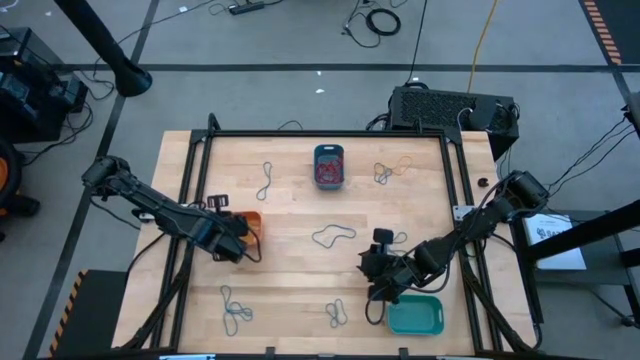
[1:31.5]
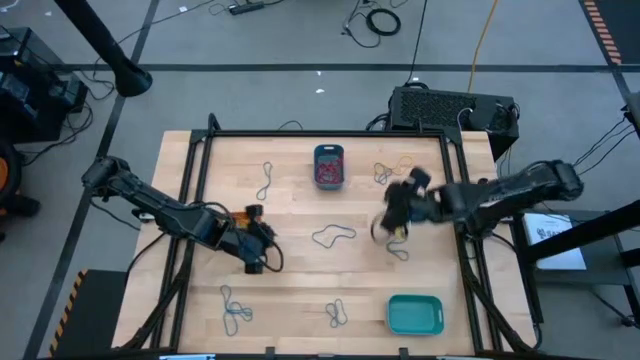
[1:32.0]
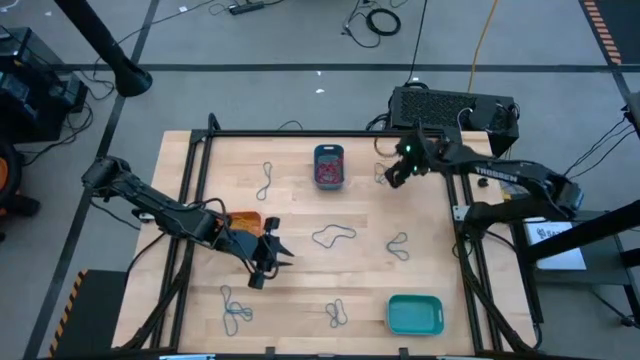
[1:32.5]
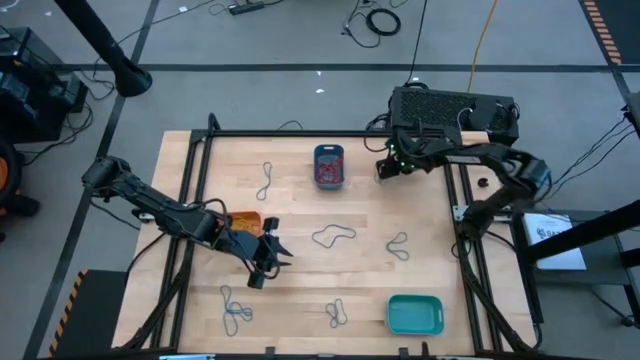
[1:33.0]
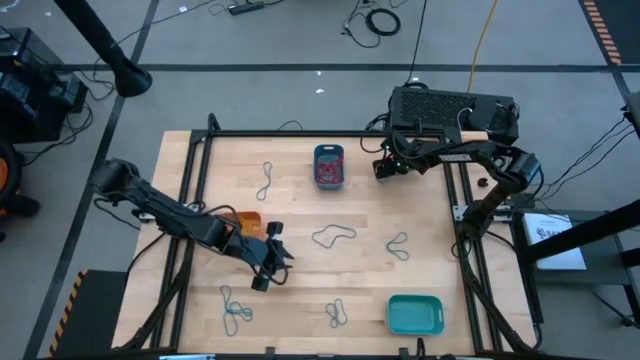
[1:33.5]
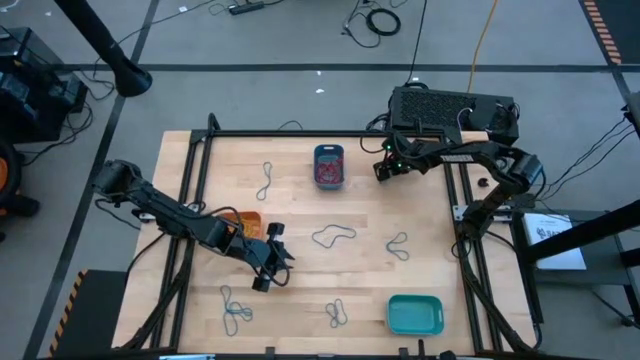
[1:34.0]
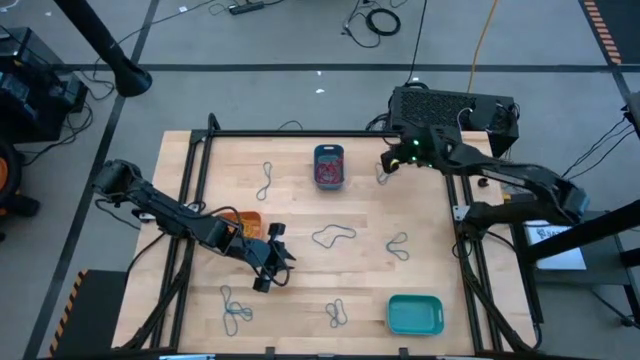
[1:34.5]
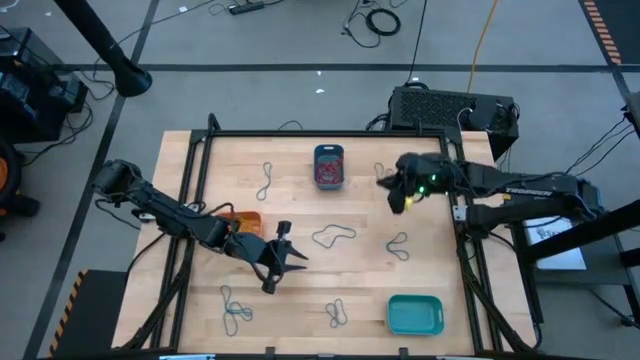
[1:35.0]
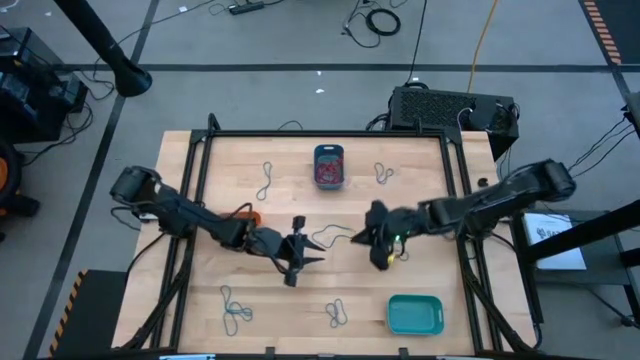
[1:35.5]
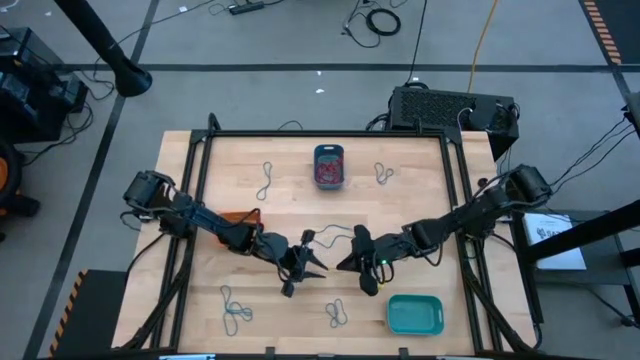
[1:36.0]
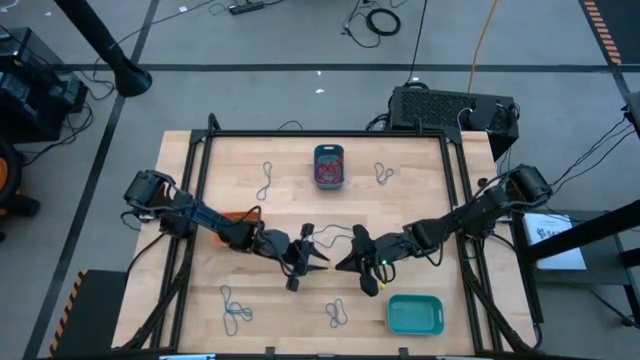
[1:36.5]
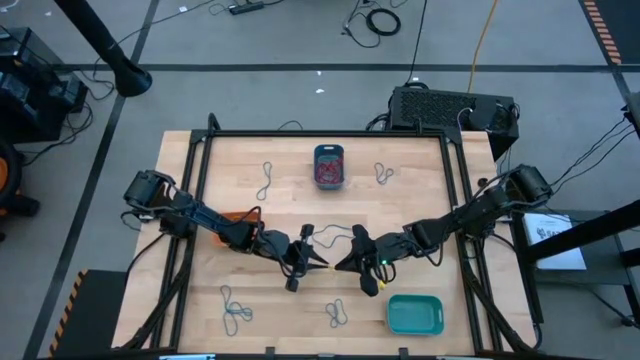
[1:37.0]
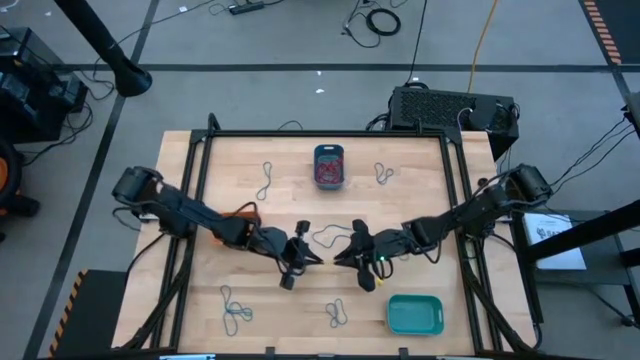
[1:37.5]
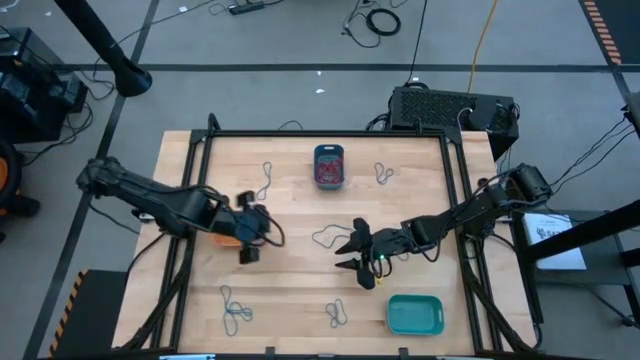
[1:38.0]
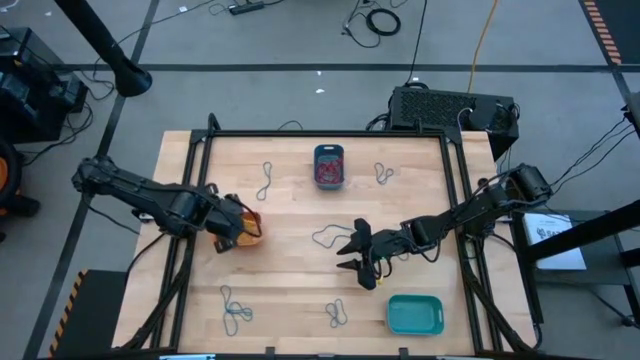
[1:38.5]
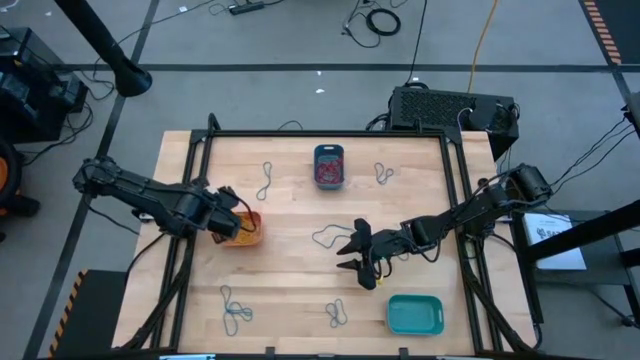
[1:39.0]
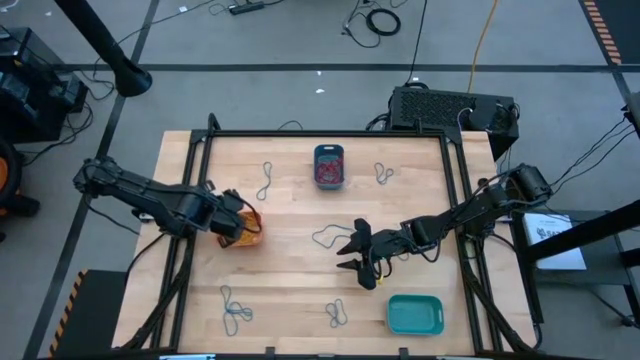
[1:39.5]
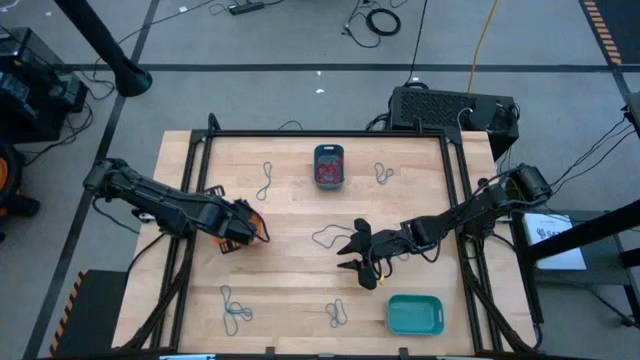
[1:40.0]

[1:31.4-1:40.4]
Task: Sort rubber bands into baskets
Put the yellow rubber band into the orange bin

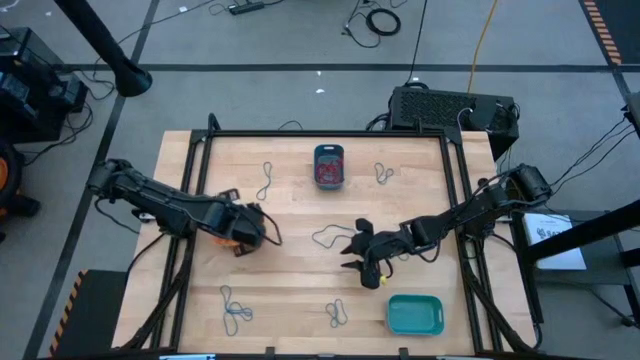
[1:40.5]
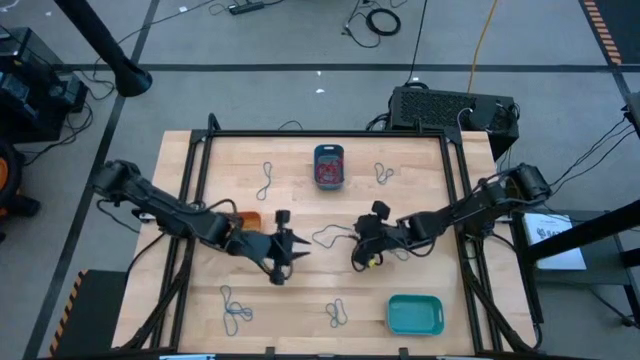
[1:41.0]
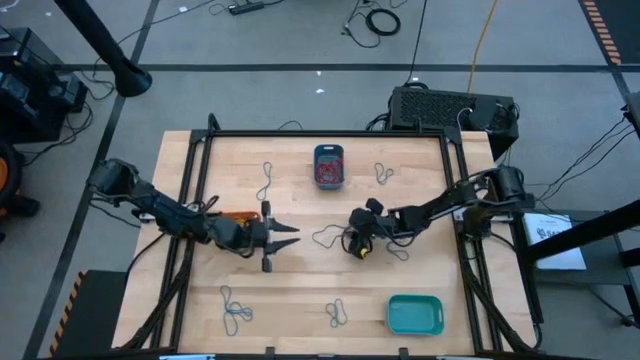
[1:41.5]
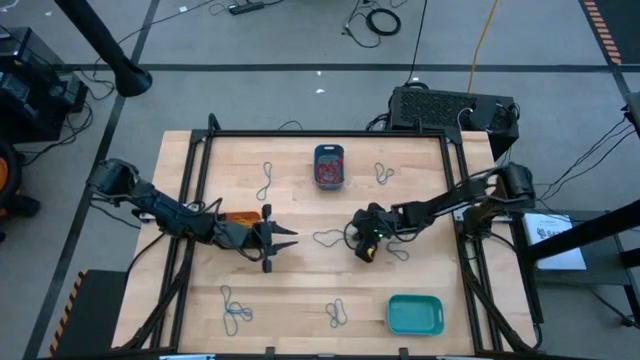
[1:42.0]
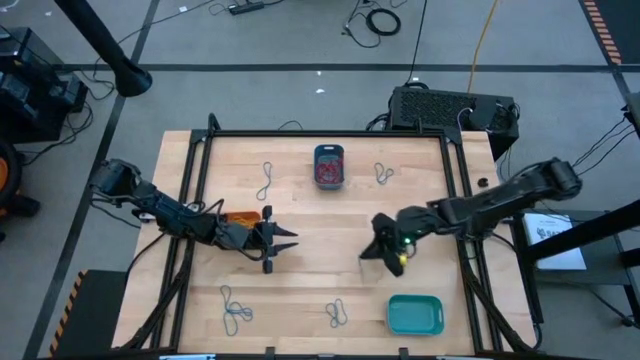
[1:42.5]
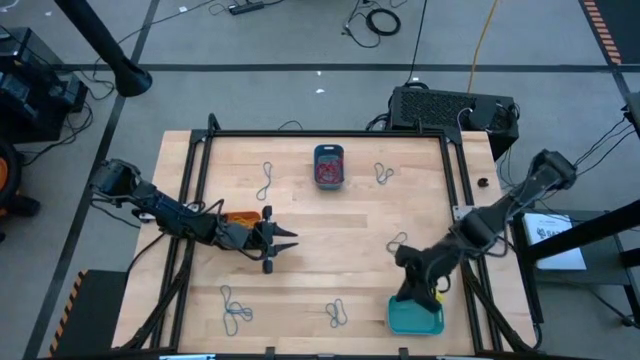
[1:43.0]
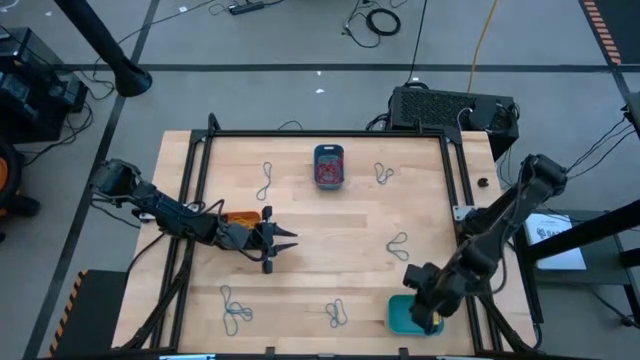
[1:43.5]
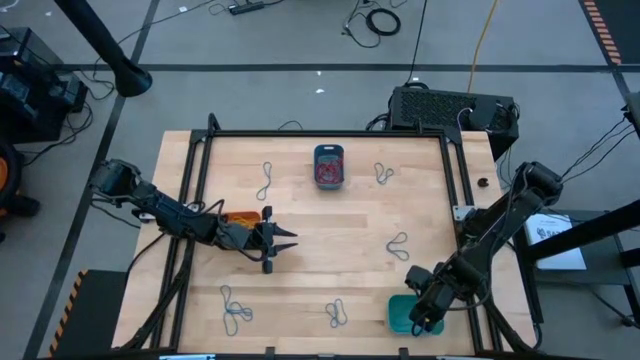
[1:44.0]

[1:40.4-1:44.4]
Put the center blue rubber band into the light blue bin

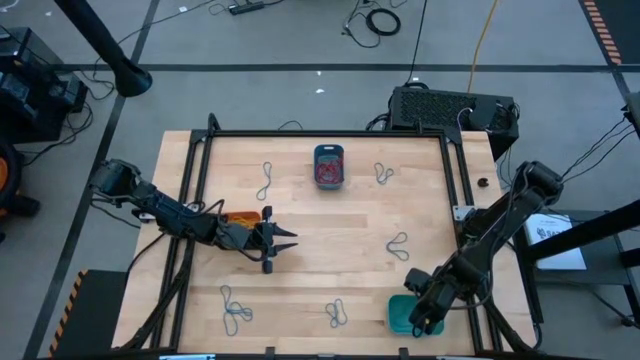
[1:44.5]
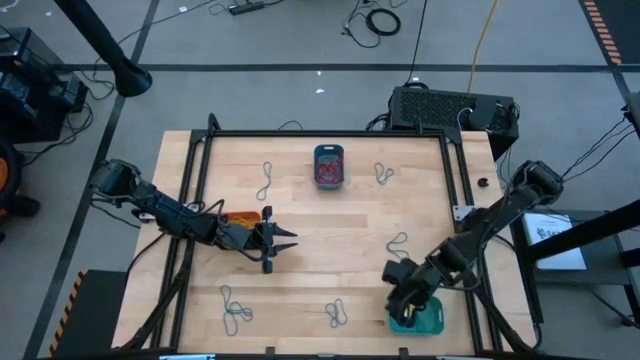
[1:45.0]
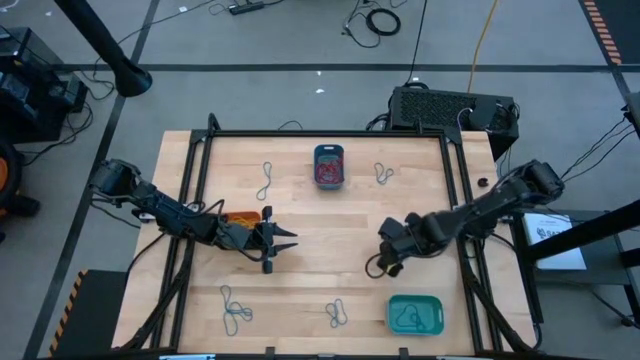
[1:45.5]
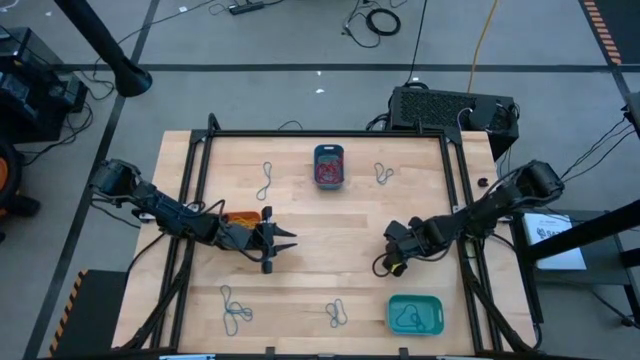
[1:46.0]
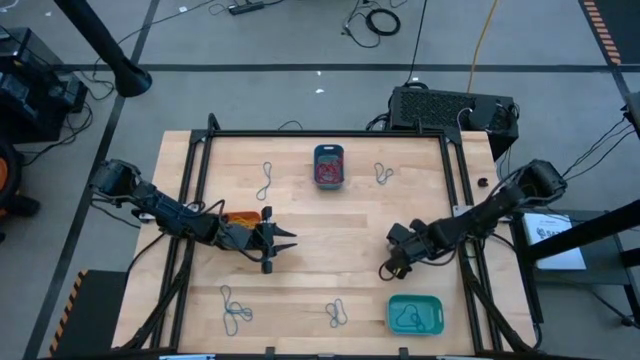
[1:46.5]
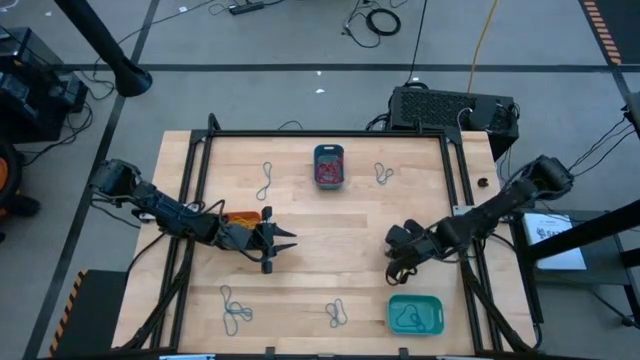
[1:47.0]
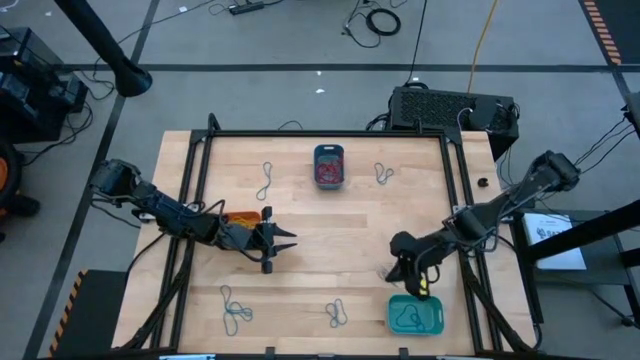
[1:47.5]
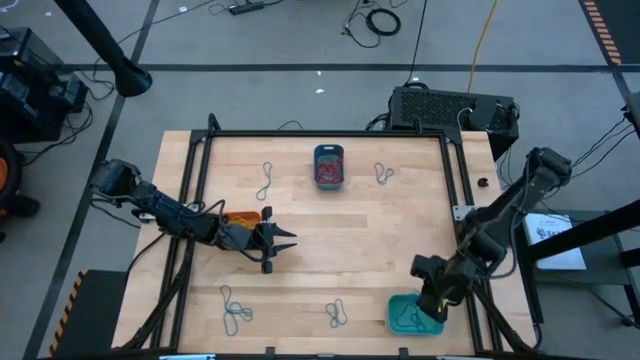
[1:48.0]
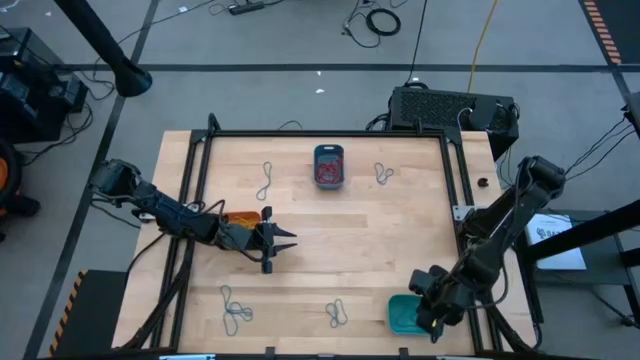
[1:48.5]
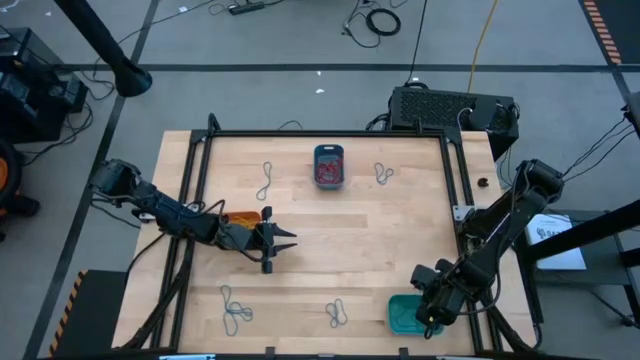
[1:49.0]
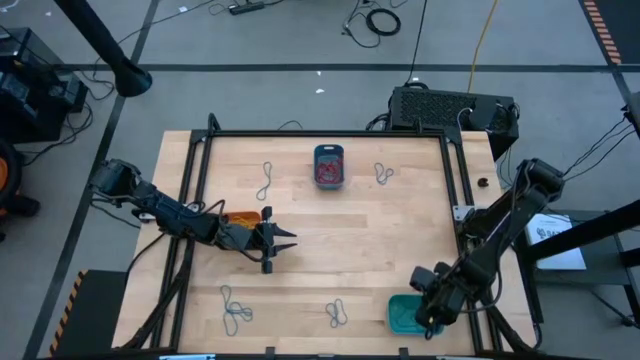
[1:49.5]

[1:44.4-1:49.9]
Put the middle right blue rubber band into the light blue bin

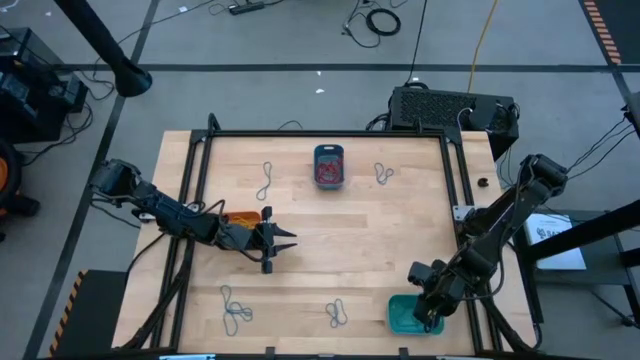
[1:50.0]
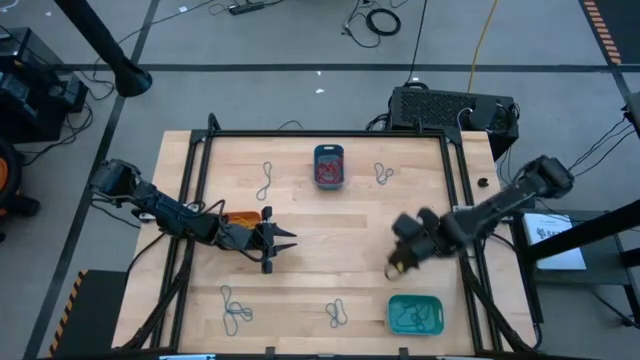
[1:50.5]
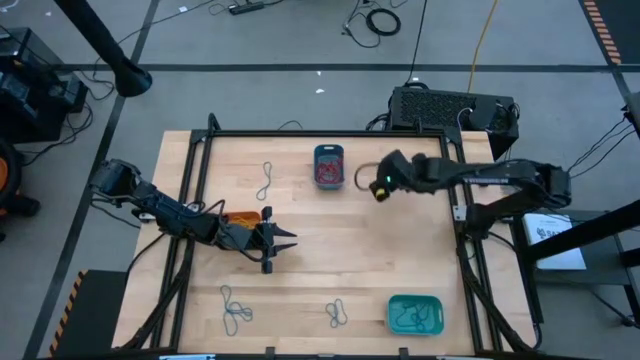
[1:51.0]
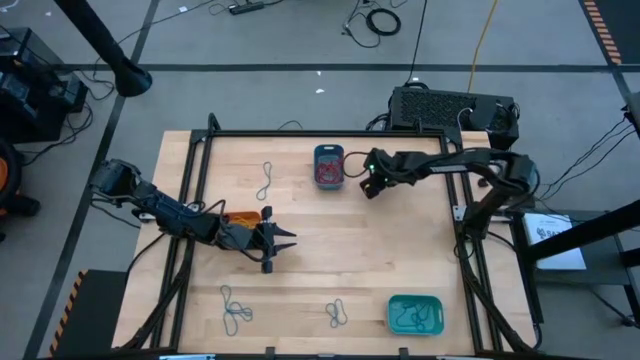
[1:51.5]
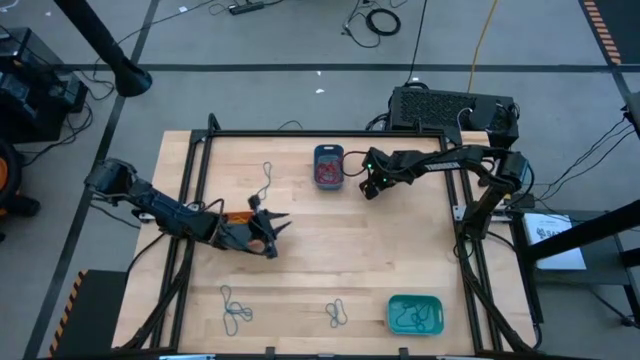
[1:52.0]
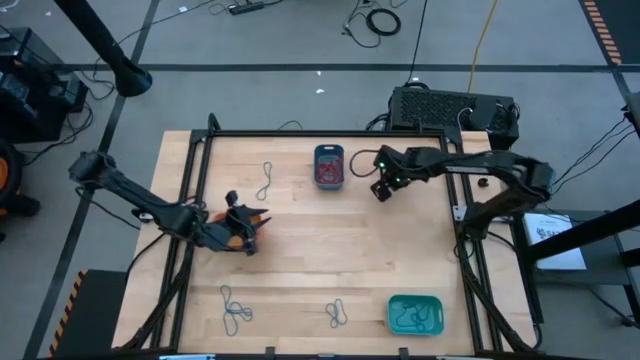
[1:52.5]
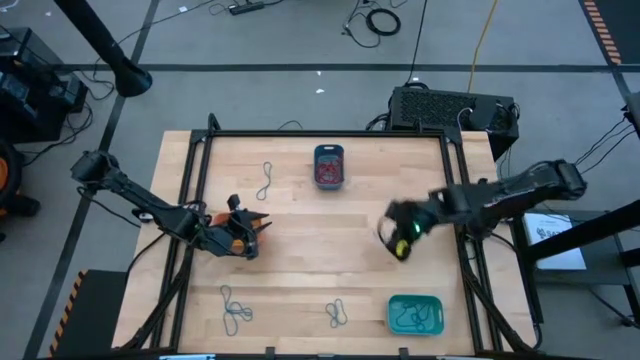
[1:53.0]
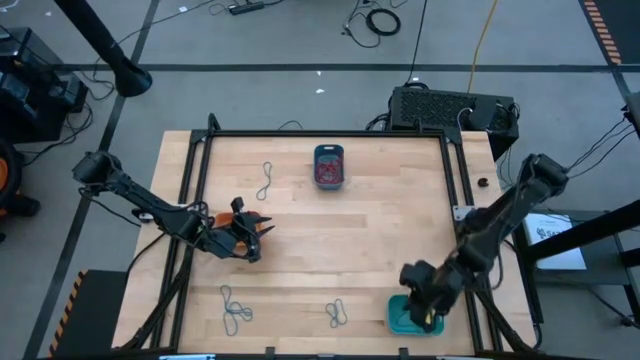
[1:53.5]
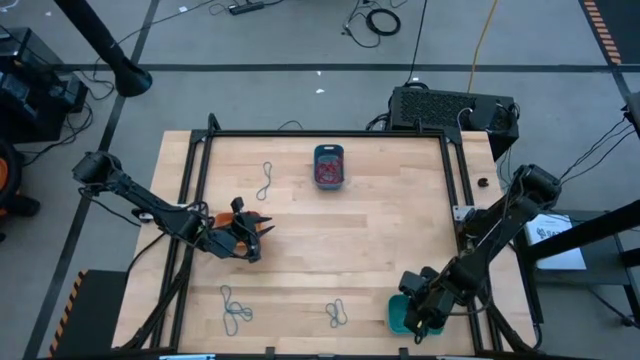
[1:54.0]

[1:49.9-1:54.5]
Put the top right blue rubber band into the light blue bin
